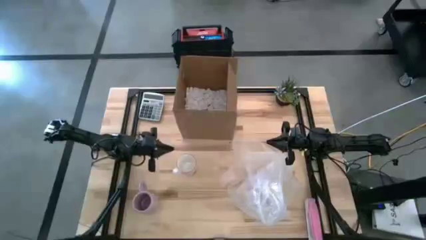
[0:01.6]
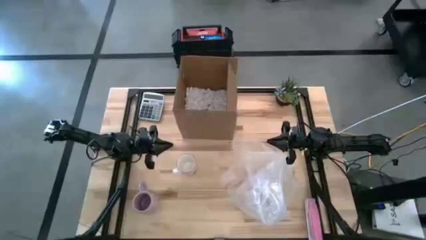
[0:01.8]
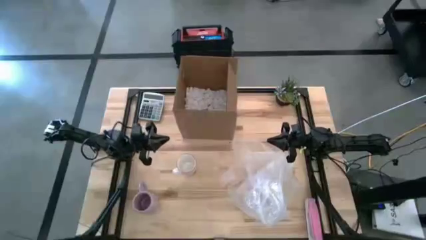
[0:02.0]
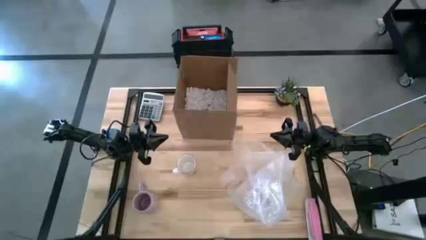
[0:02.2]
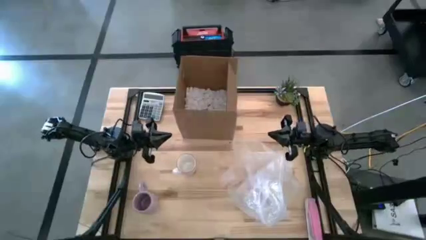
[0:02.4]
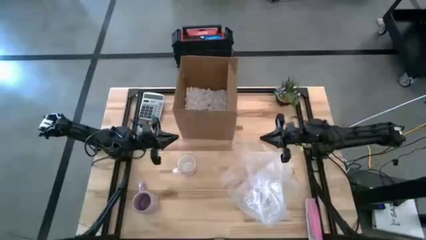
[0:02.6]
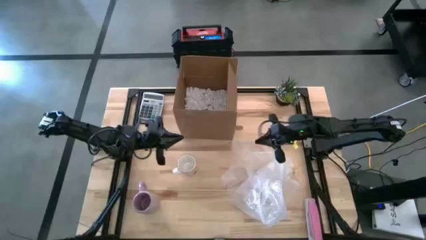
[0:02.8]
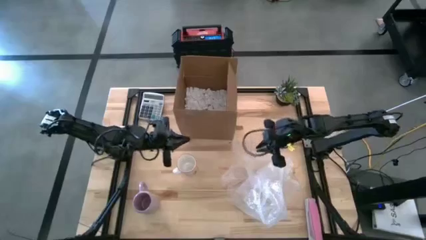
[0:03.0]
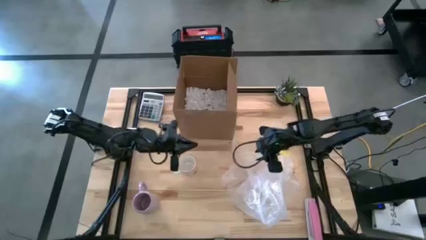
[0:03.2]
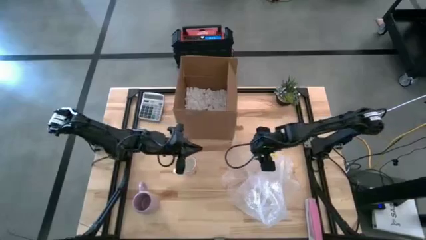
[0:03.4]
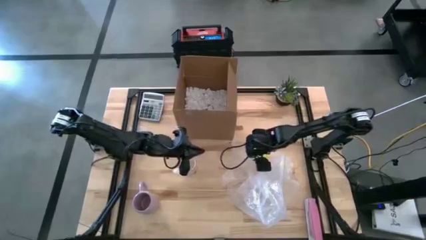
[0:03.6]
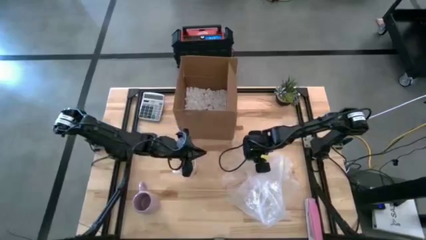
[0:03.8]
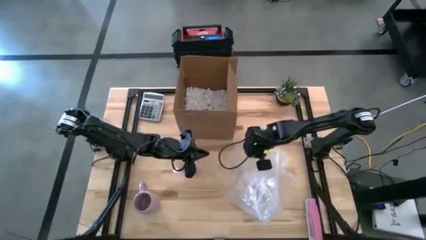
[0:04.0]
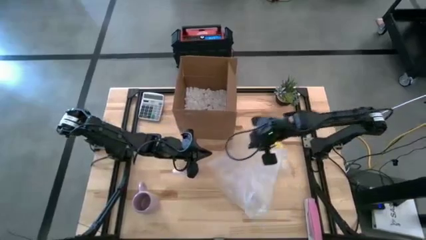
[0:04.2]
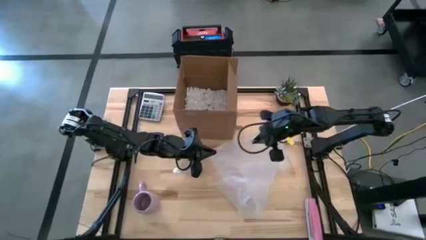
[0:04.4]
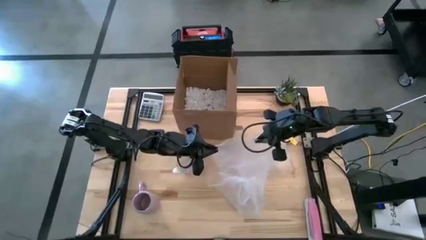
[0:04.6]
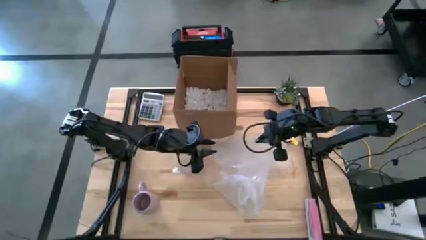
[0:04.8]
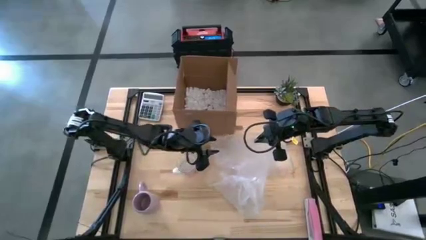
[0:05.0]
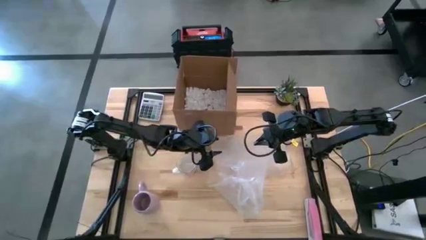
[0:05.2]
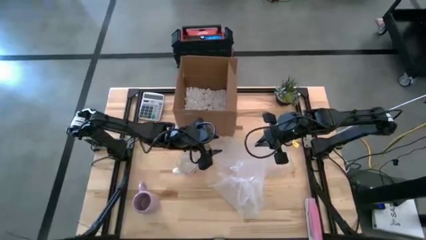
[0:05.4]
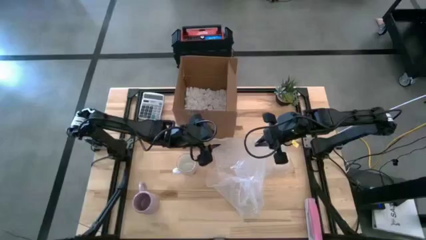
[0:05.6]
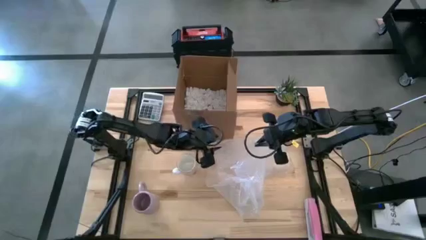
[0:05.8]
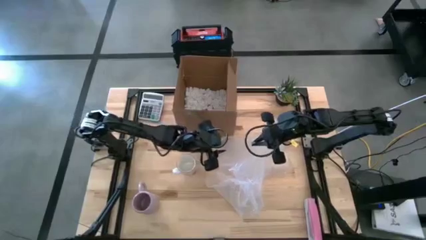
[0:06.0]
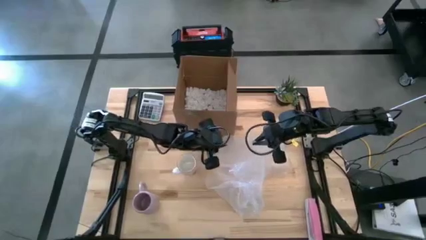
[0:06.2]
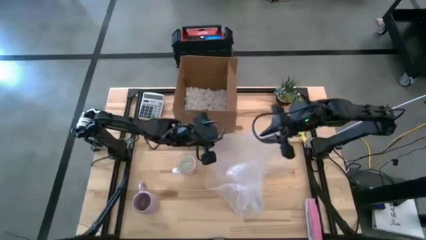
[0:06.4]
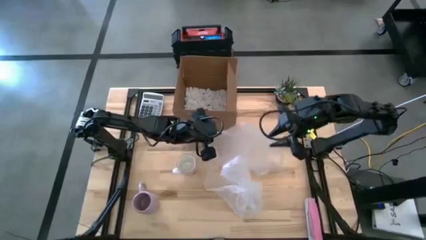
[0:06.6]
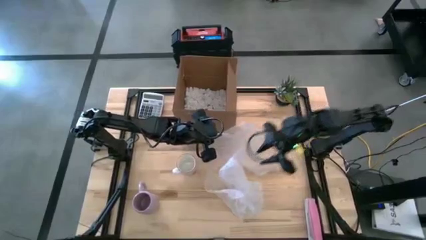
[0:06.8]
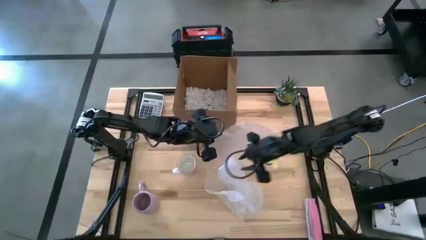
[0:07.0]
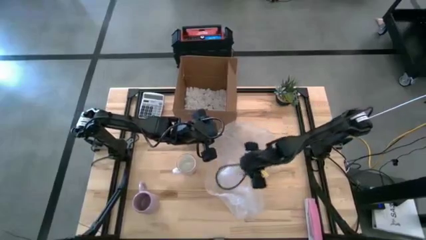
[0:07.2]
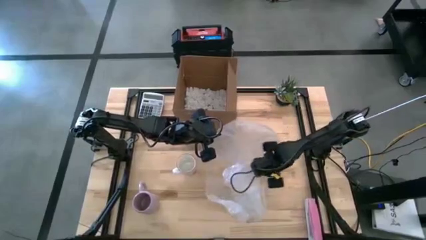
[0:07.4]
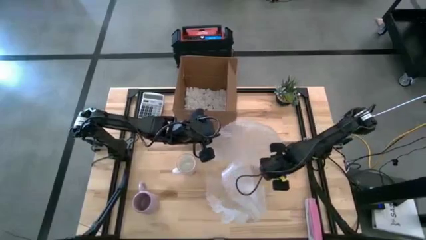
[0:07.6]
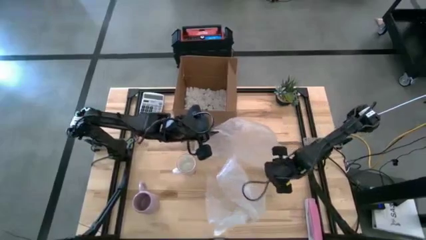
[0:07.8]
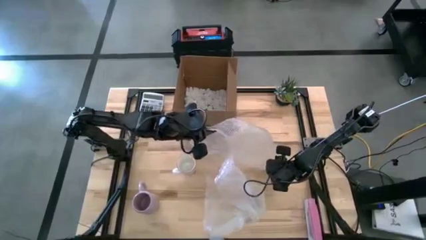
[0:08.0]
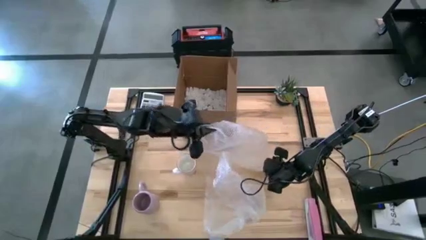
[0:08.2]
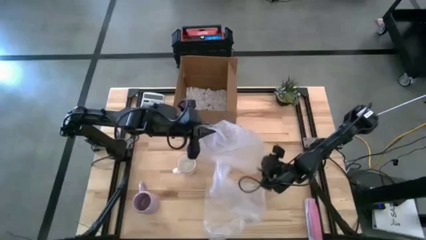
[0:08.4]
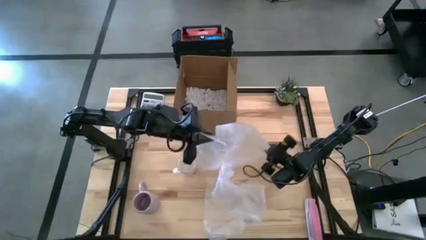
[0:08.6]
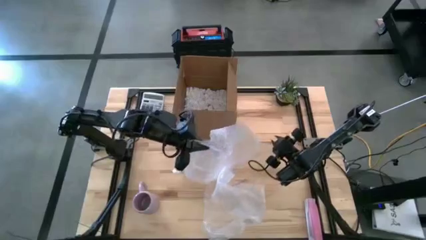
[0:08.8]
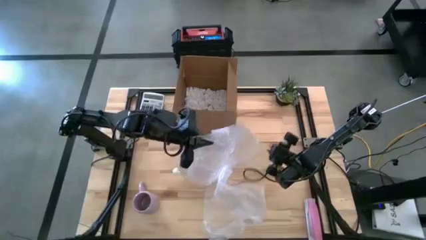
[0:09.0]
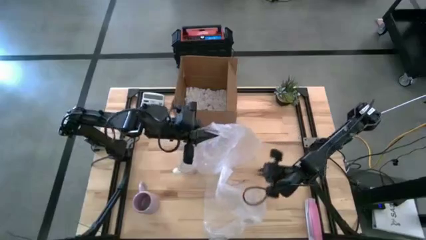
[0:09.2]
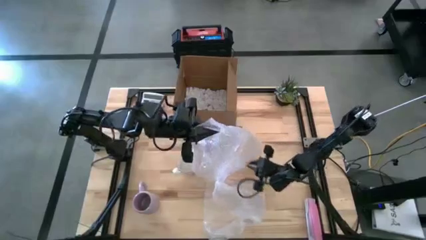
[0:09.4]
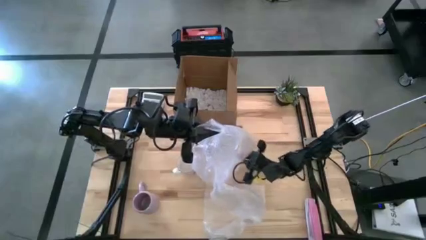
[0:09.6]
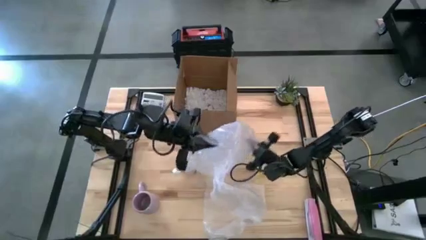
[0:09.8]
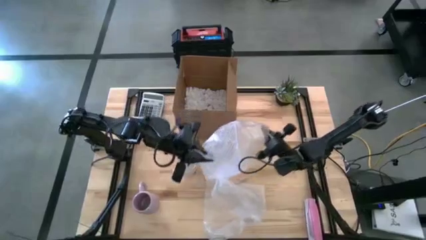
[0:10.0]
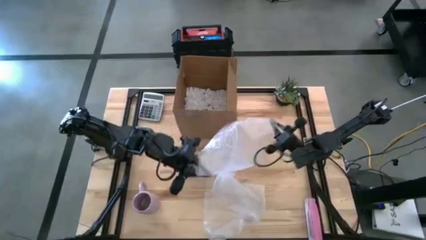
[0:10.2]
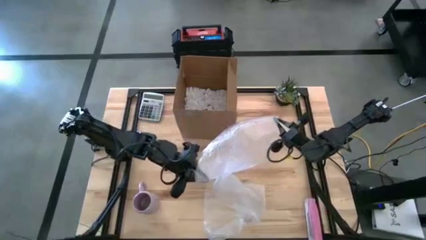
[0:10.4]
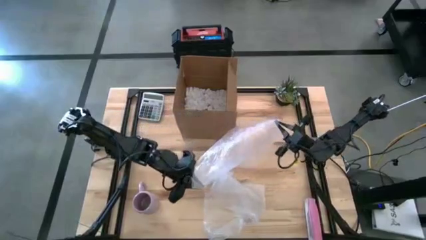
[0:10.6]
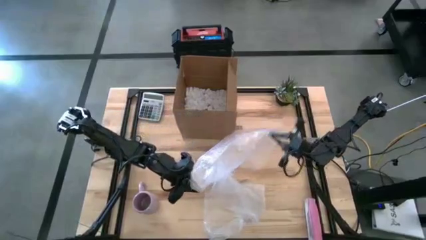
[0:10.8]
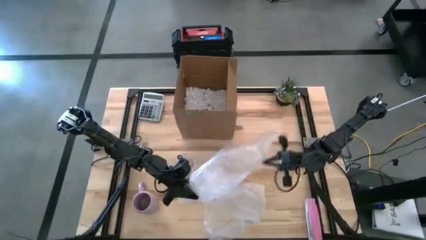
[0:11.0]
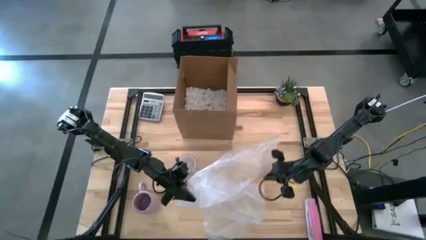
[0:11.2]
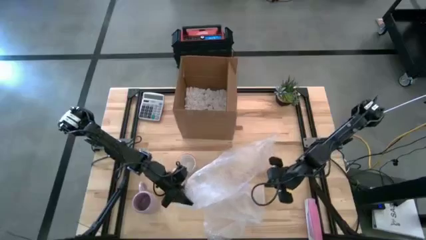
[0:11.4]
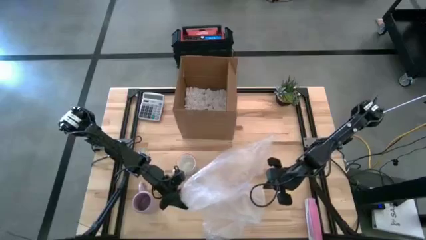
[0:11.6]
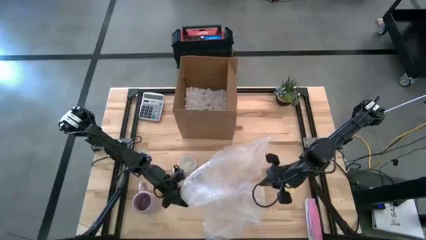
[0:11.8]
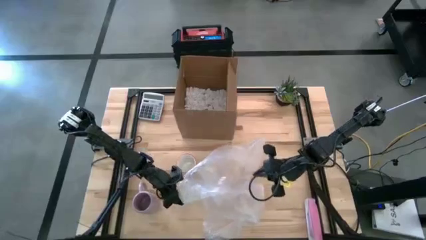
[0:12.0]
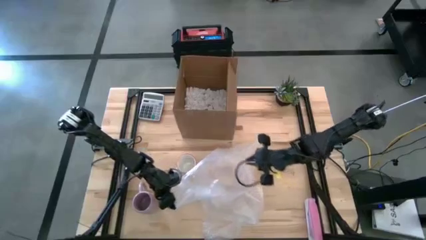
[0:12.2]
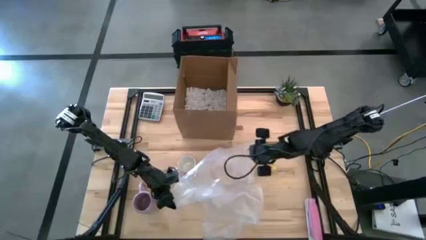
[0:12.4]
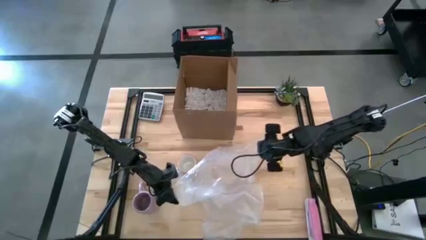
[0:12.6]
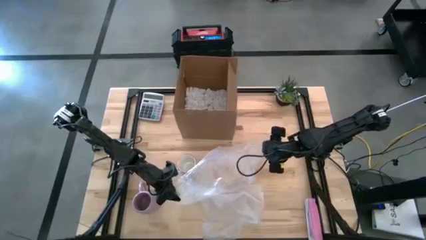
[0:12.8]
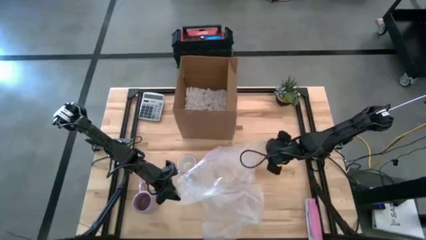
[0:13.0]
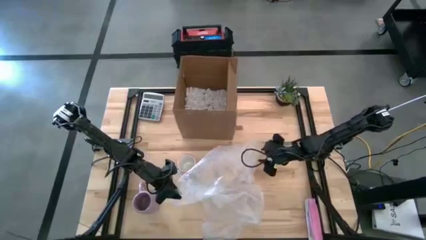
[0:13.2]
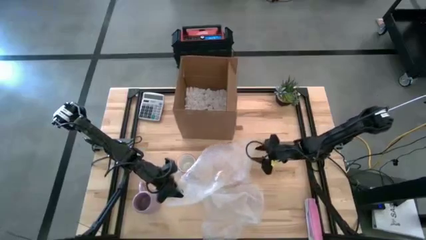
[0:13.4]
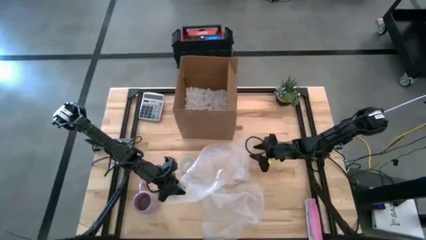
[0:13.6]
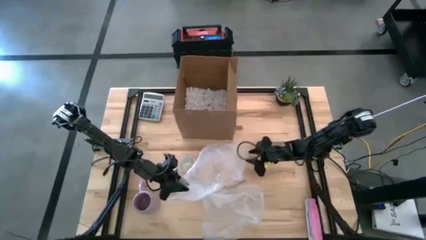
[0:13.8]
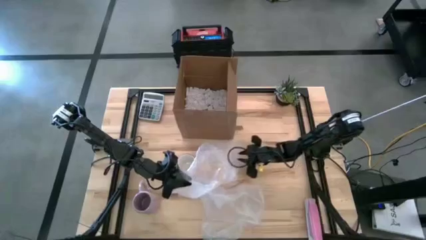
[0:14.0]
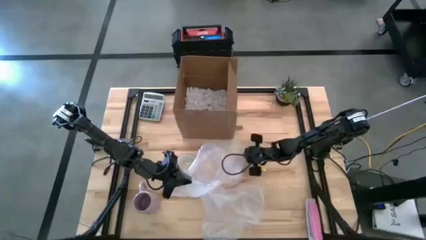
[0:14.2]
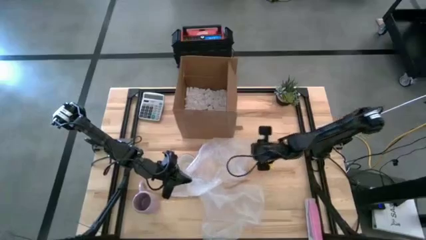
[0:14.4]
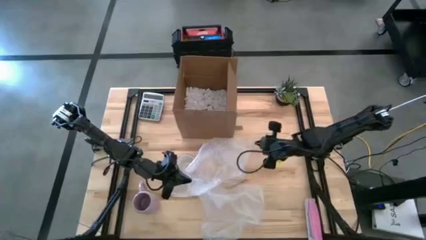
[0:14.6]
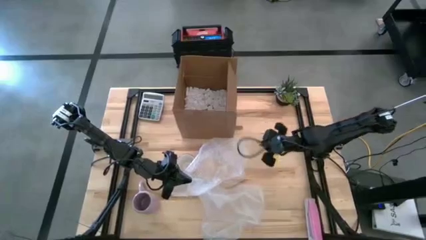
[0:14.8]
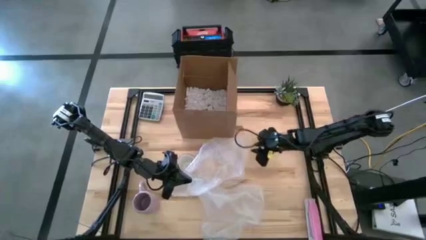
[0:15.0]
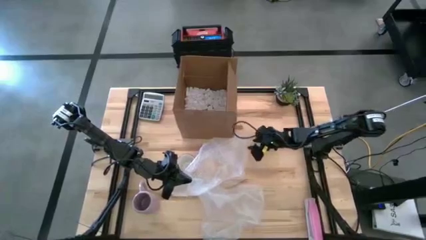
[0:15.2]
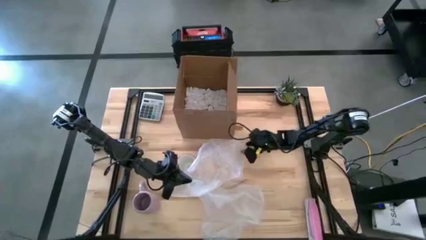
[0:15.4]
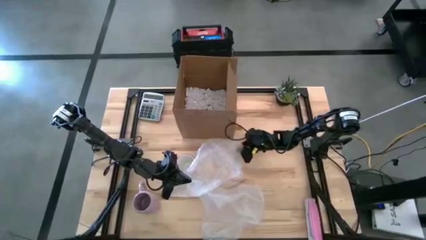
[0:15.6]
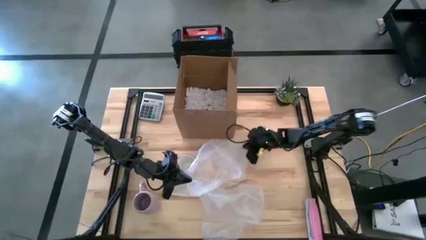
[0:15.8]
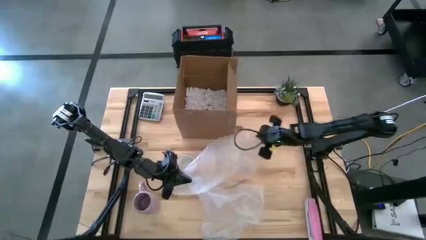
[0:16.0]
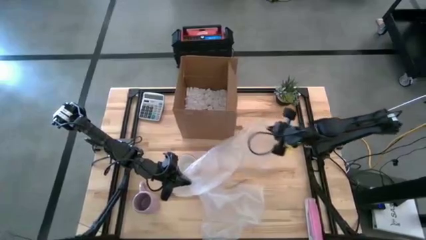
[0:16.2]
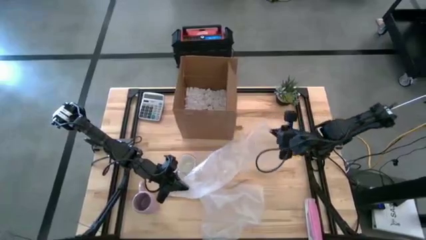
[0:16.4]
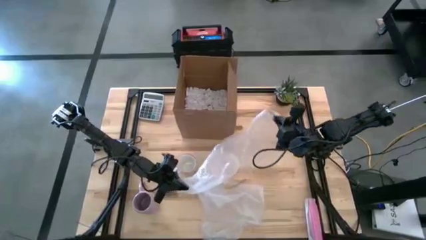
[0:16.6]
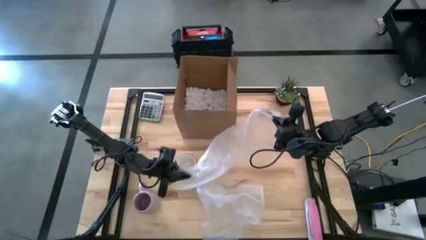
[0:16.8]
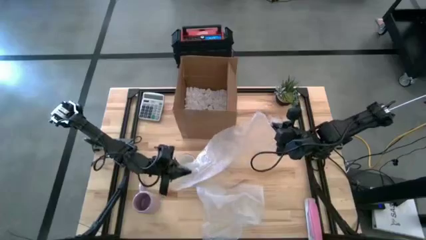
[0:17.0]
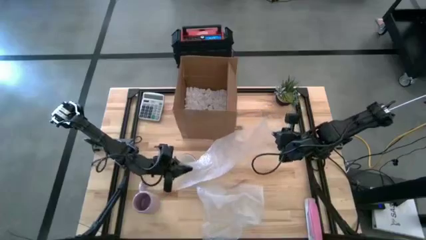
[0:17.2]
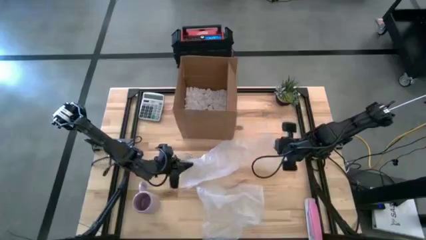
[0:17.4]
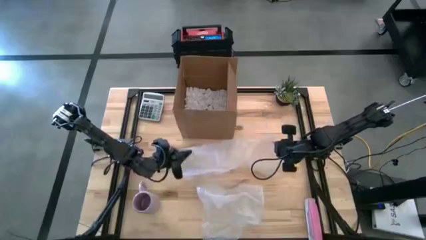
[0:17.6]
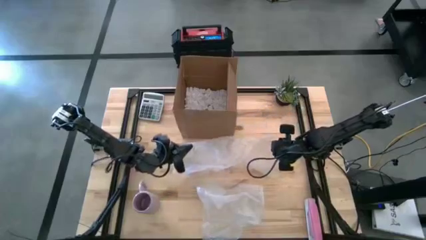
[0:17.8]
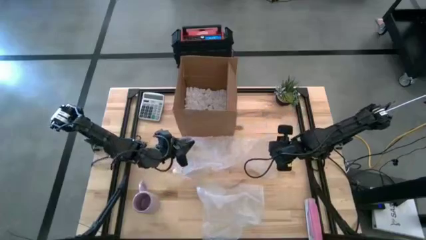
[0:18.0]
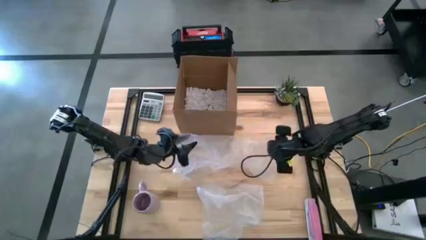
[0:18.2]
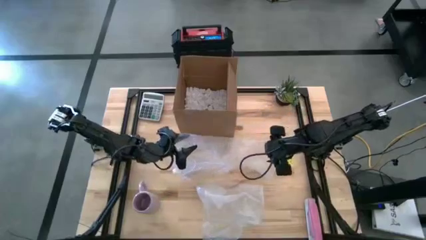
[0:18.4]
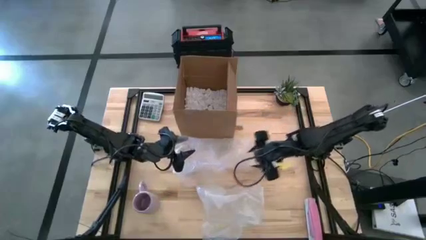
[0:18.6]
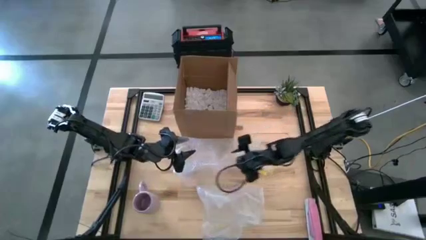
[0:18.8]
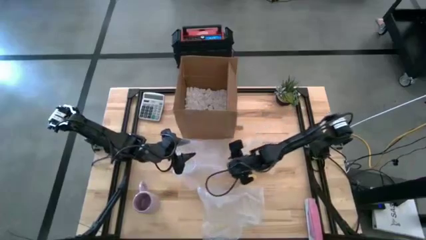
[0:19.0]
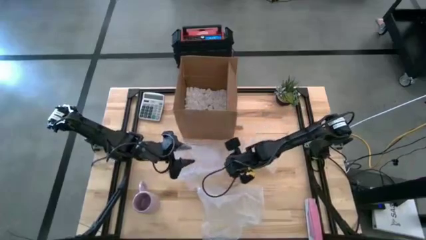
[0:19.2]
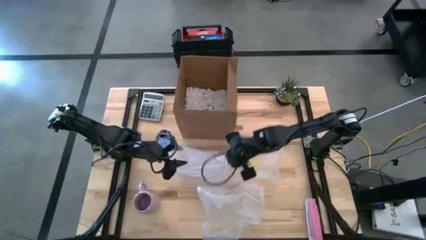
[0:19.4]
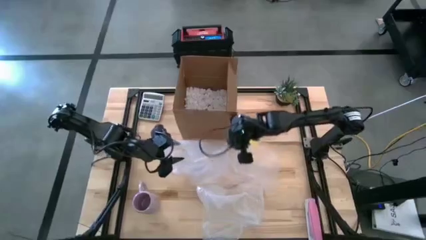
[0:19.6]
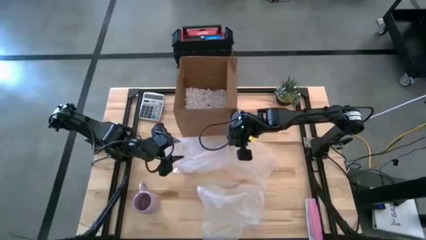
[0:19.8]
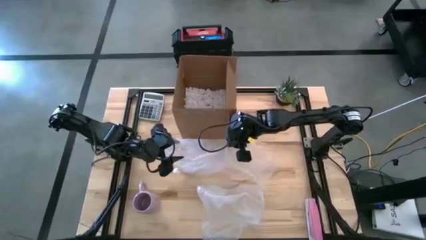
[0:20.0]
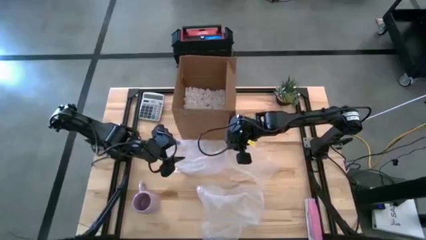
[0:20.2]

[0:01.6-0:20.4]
Task: wrap mug
Wrap the white mug with the bubble wrap
